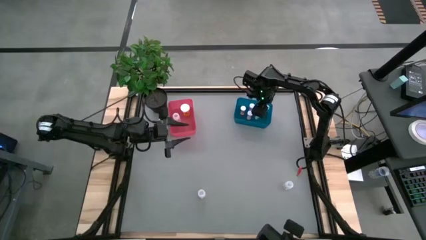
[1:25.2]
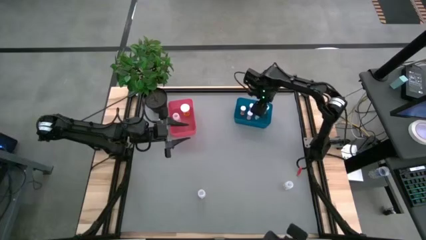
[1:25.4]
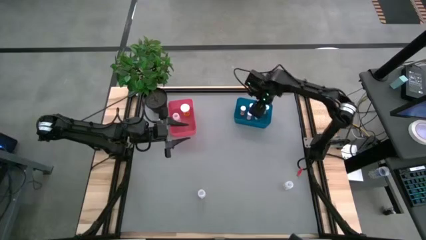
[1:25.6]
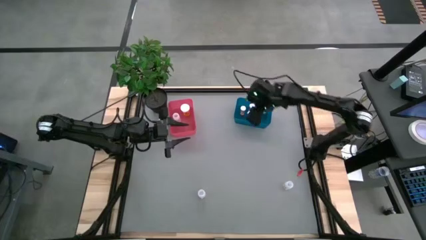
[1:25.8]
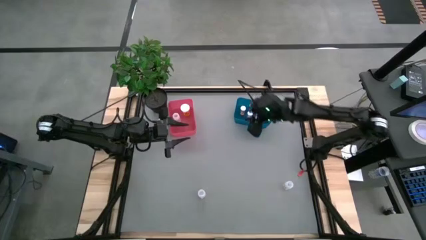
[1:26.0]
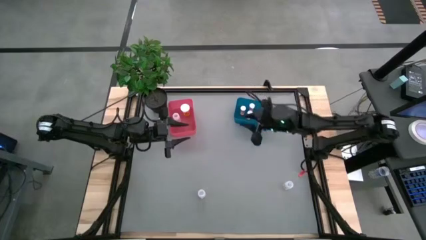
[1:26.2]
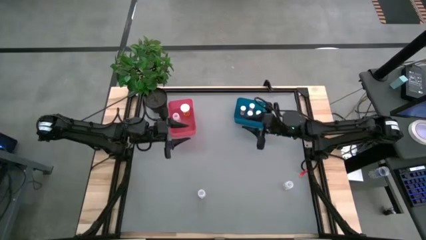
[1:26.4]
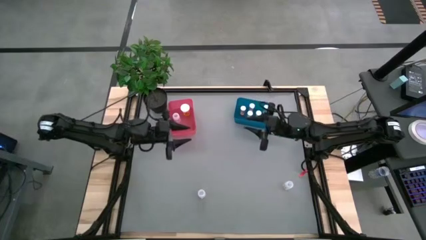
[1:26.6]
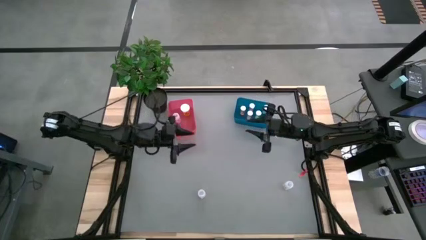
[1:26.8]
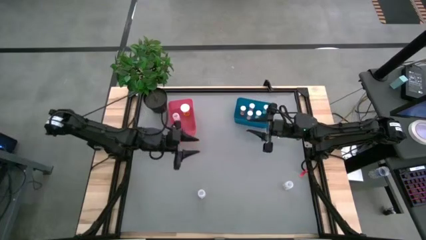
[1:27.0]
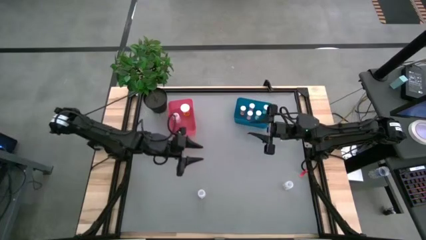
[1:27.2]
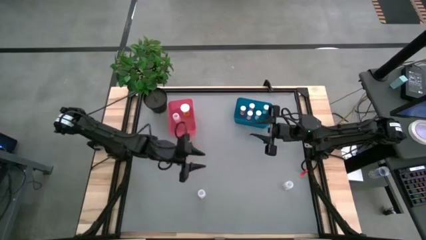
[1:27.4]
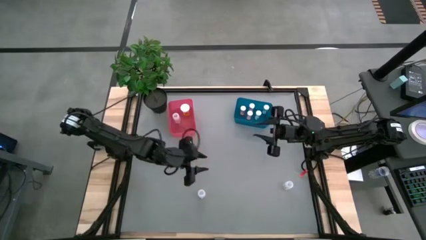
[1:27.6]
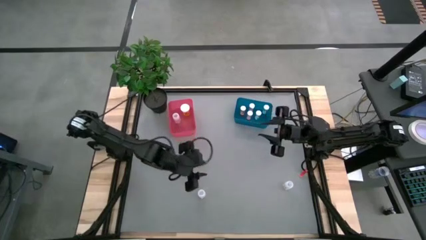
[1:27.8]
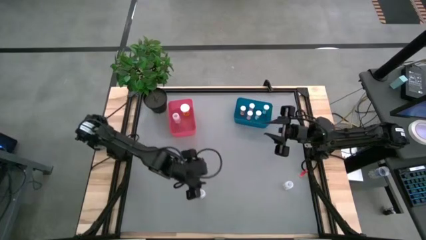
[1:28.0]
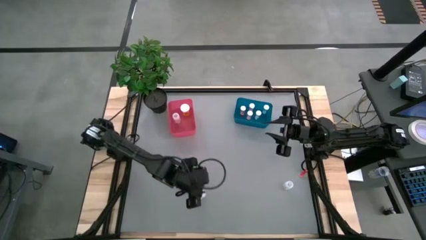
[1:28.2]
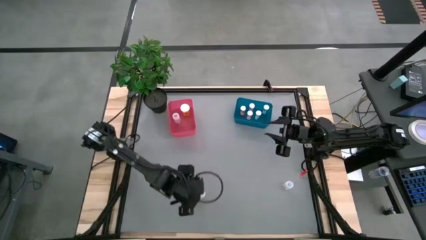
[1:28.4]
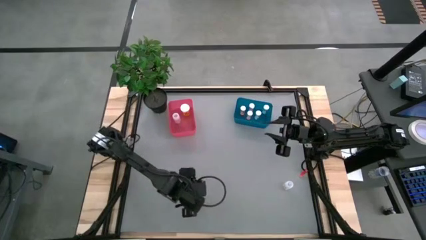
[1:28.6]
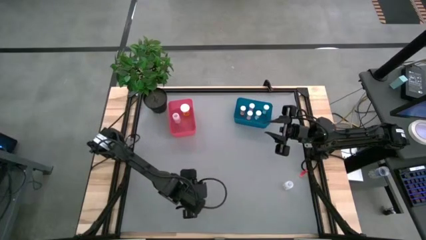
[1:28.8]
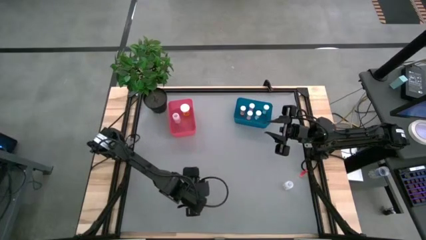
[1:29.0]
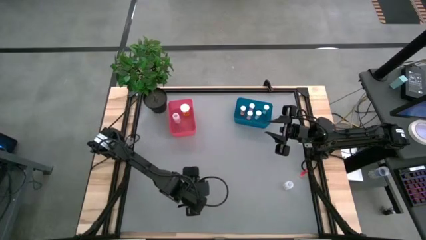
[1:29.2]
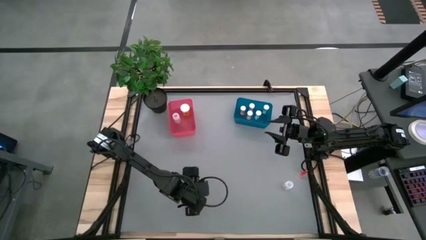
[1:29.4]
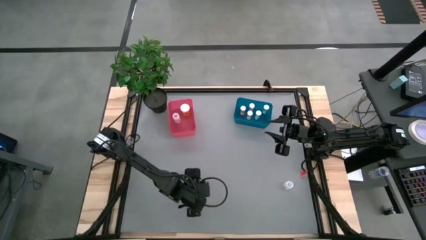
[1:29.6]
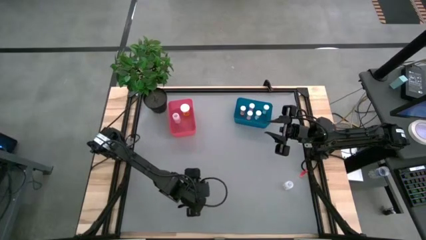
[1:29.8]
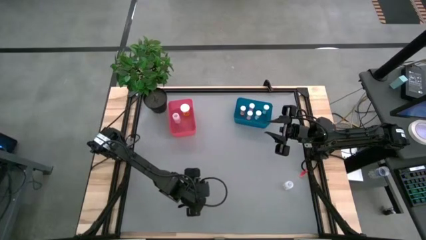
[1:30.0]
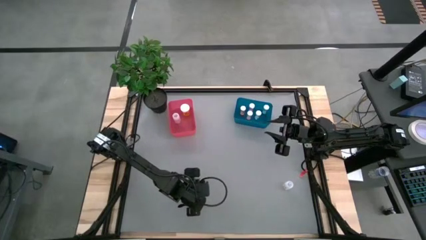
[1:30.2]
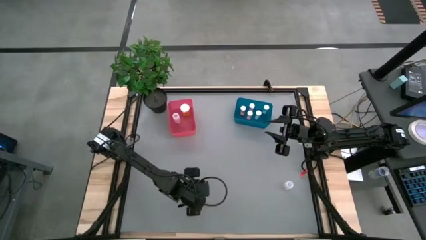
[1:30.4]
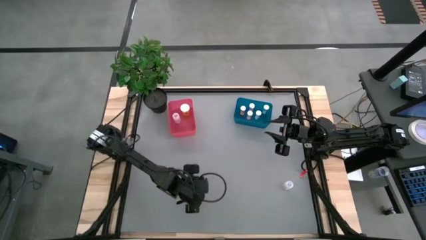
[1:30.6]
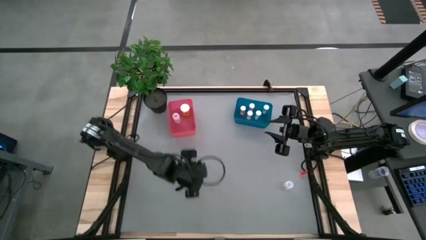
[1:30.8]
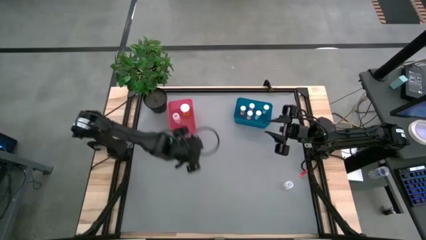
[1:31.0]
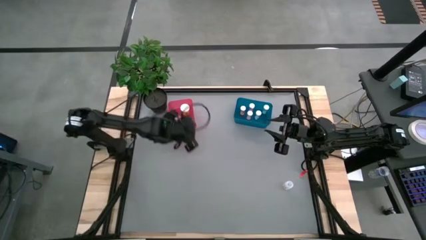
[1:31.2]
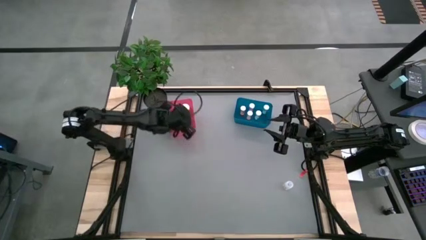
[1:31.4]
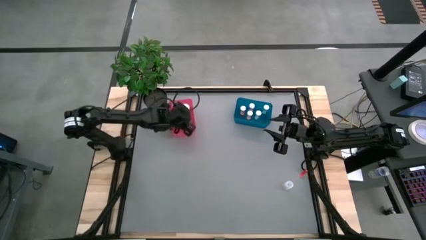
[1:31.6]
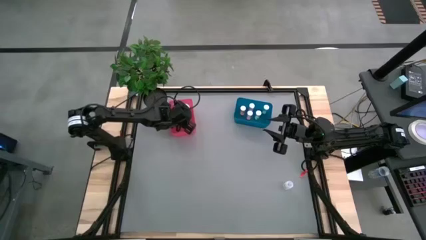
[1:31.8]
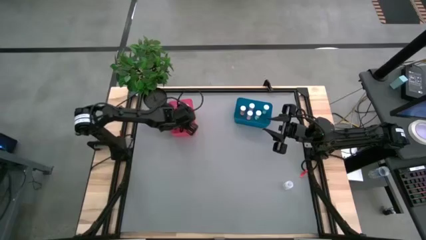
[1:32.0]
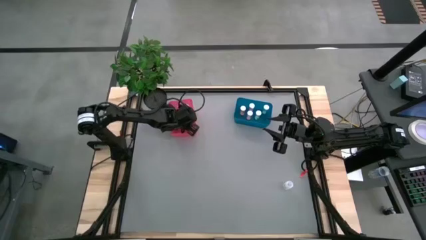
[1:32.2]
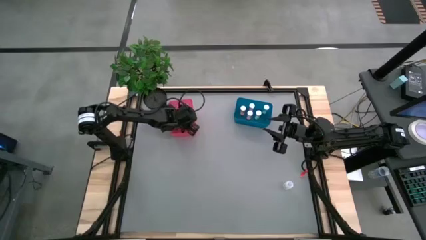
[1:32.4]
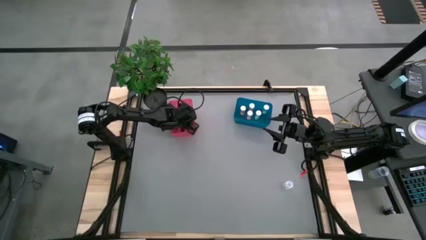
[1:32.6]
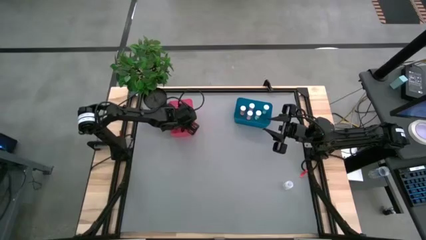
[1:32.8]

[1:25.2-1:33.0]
Task: Pick and place medicine bottles into bin by pill shape (circle, oval)
Put the left transparent capsule bottle into the red bin

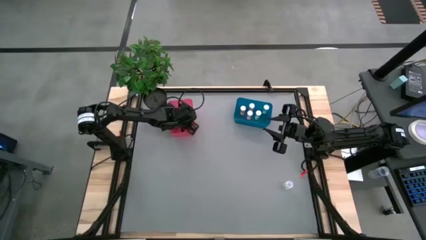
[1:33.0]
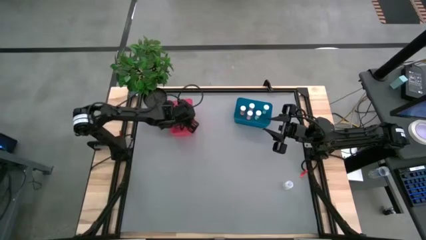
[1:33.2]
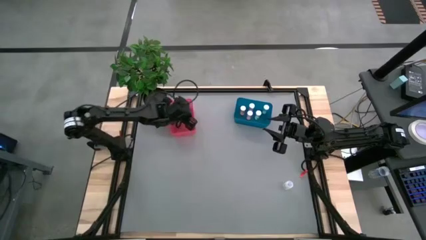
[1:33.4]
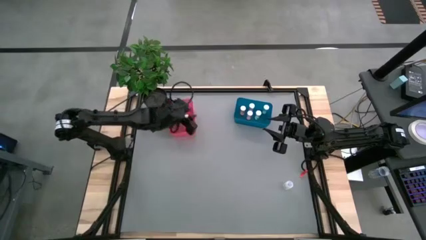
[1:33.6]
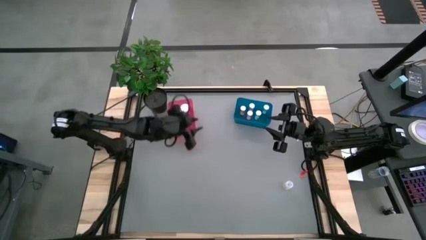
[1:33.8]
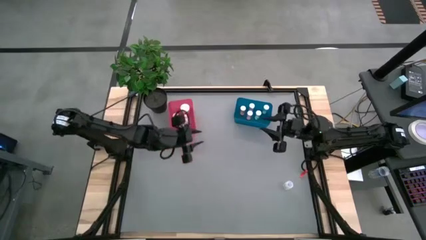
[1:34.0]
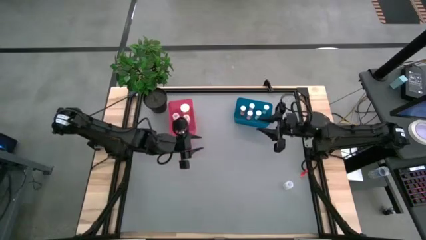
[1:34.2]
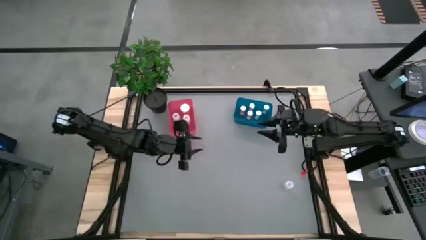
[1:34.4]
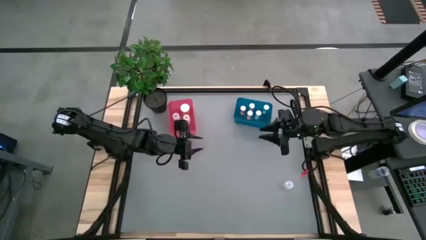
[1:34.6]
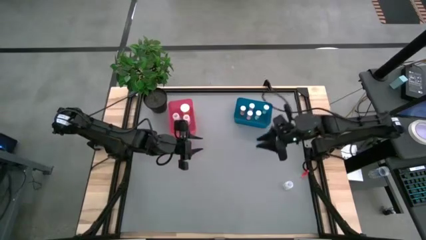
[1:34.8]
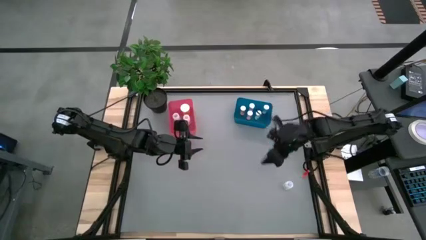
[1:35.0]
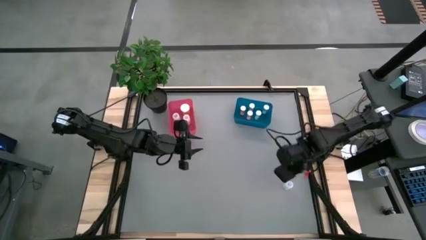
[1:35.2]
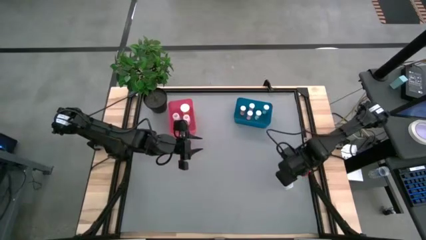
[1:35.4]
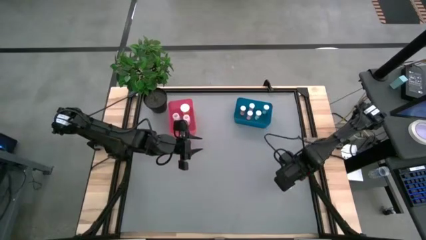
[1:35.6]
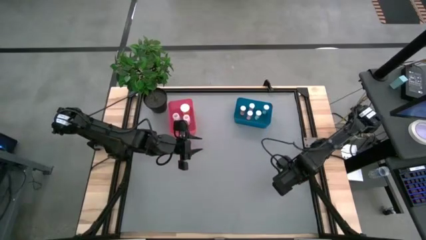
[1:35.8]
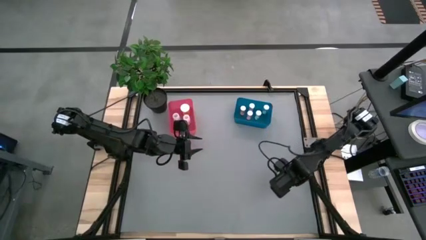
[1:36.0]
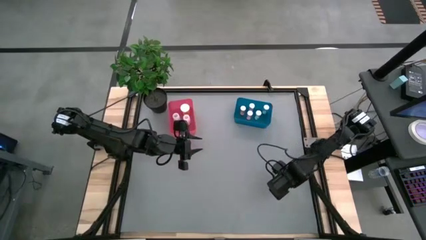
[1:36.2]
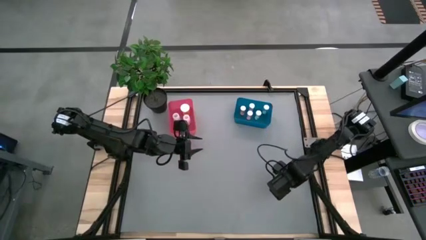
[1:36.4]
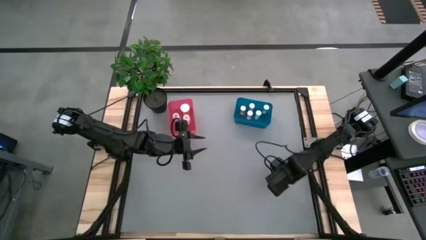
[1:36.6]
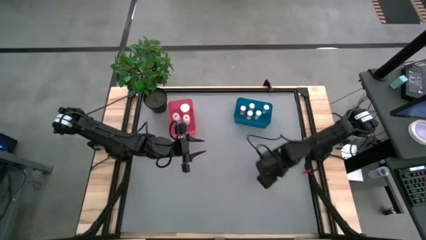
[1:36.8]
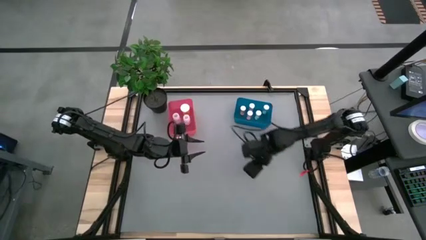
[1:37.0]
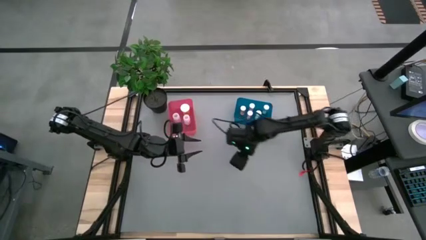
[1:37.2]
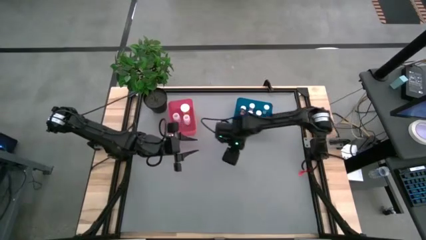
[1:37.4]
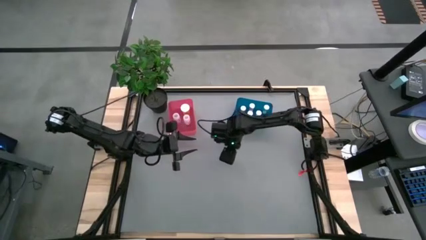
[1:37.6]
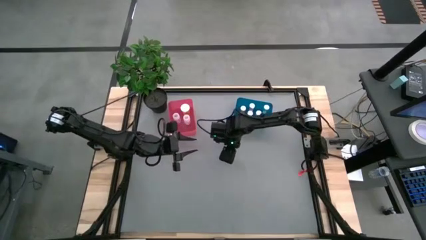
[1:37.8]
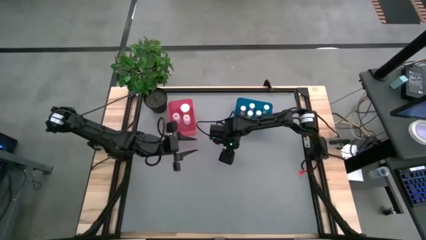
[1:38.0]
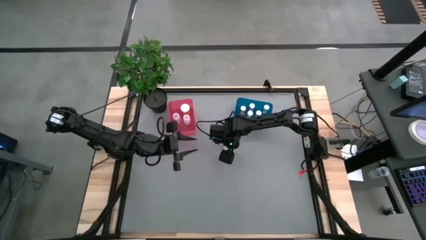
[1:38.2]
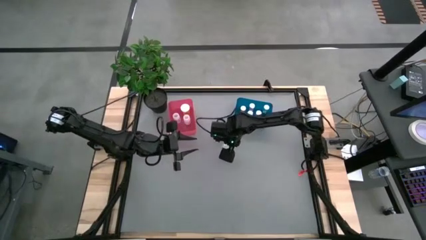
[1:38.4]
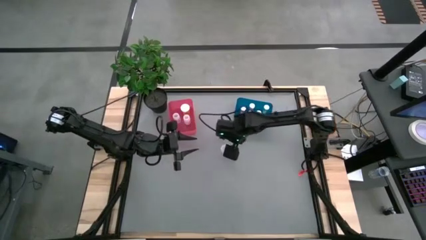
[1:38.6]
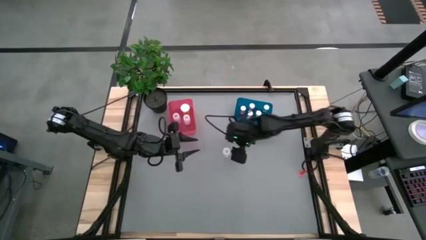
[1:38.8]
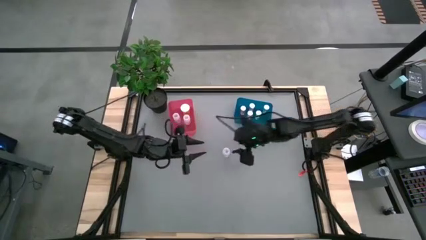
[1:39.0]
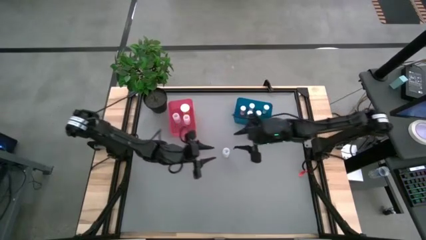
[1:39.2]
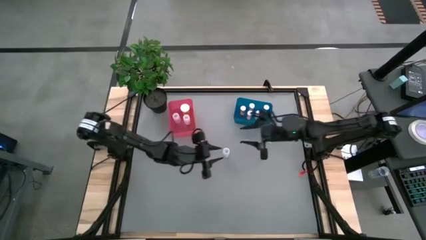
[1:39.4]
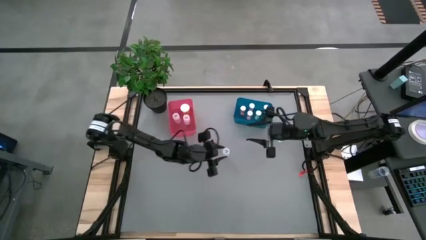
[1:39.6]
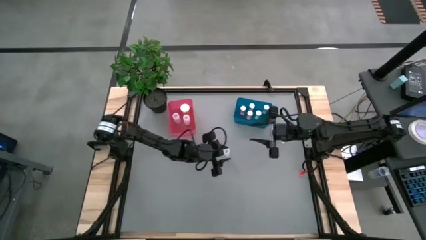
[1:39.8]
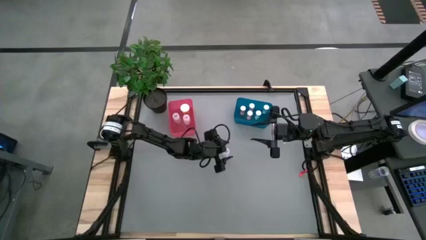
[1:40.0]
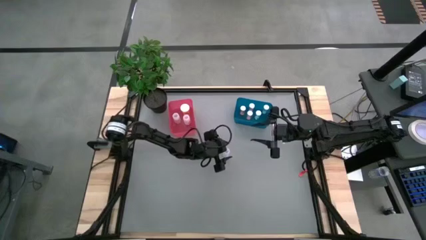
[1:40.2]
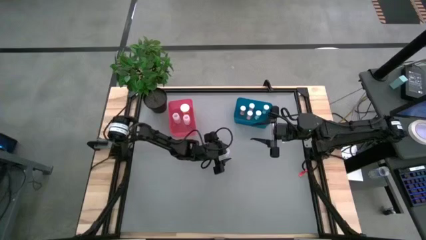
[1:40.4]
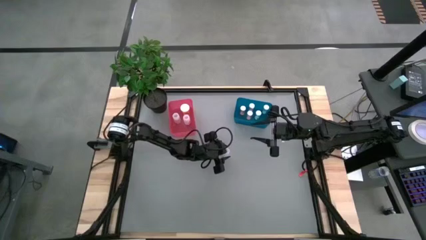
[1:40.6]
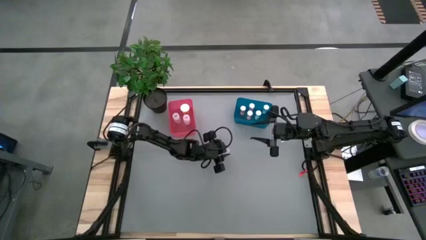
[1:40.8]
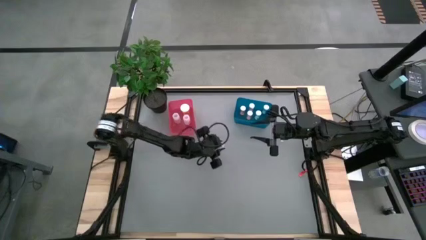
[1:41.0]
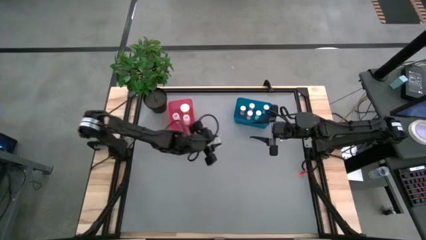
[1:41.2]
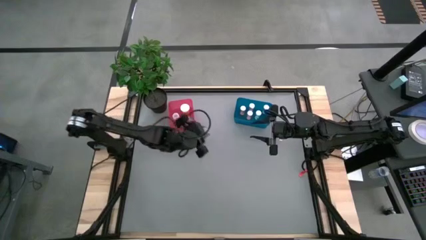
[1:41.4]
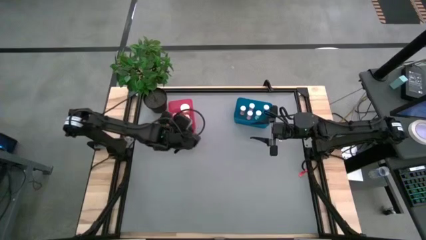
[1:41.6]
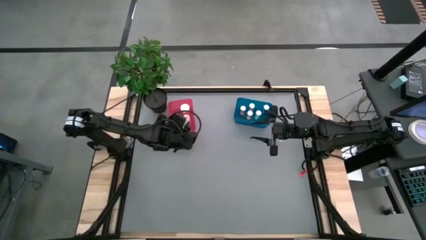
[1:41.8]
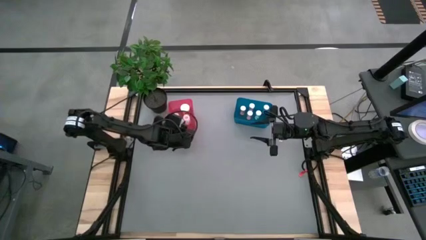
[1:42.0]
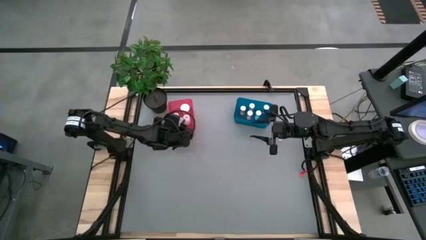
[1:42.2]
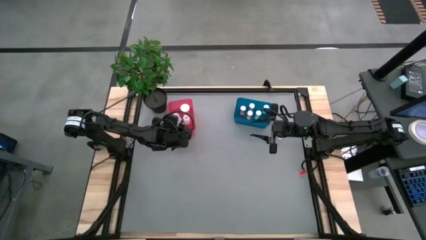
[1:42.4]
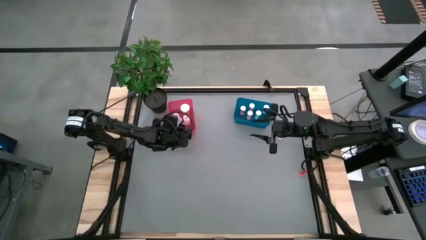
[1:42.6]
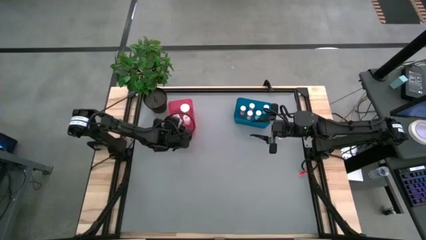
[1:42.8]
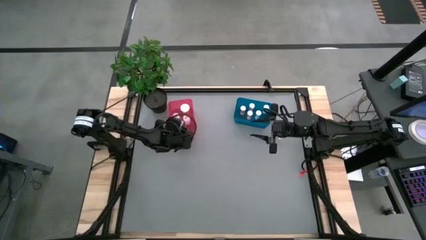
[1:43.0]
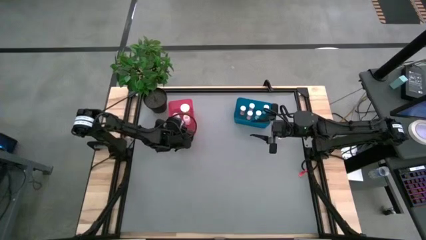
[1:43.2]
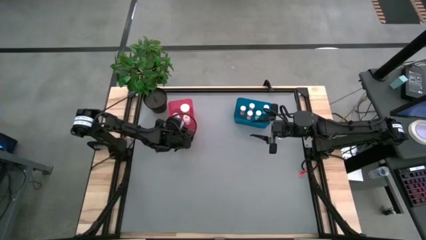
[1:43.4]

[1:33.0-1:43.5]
Put the transparent capsule bottle into the red bin
